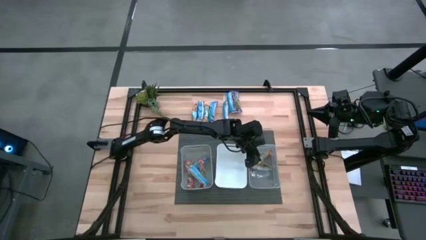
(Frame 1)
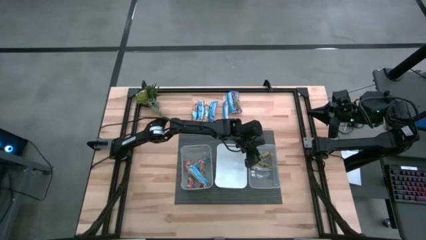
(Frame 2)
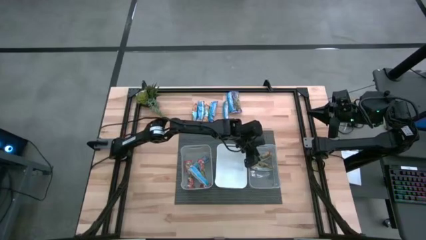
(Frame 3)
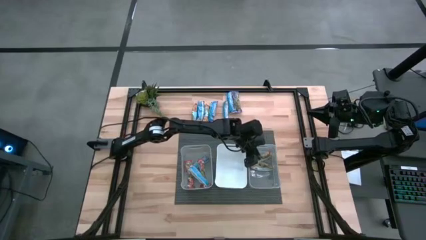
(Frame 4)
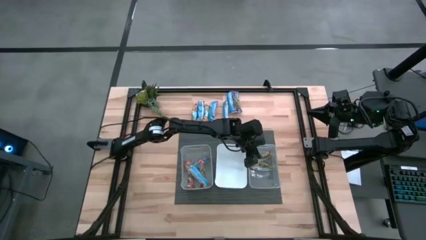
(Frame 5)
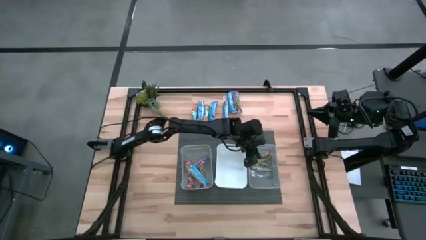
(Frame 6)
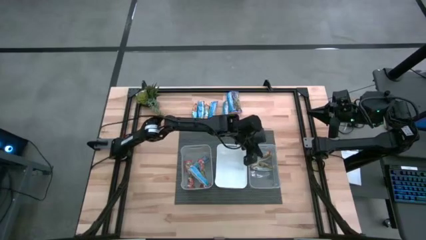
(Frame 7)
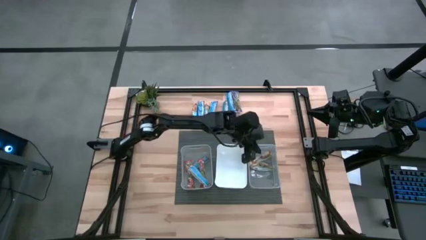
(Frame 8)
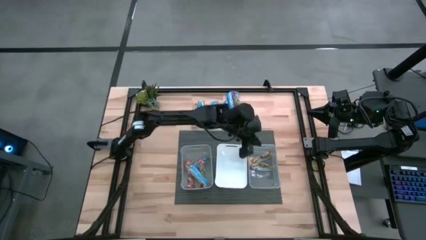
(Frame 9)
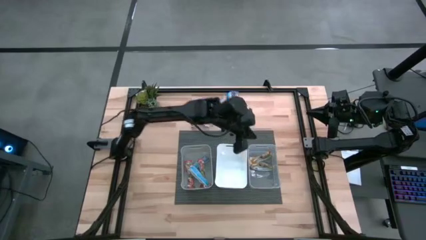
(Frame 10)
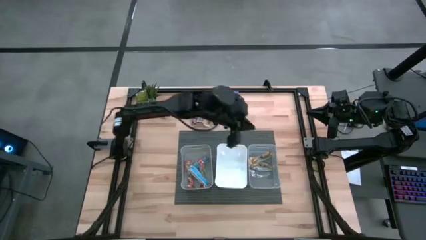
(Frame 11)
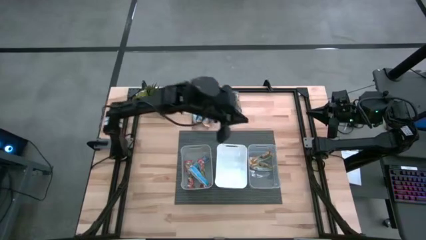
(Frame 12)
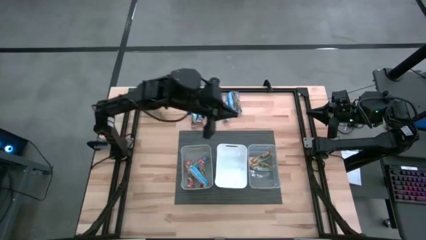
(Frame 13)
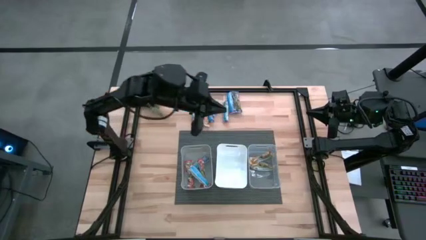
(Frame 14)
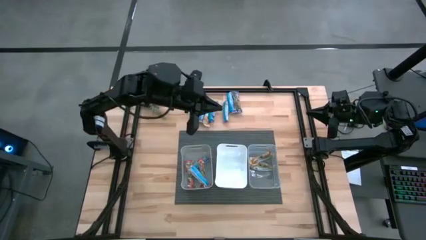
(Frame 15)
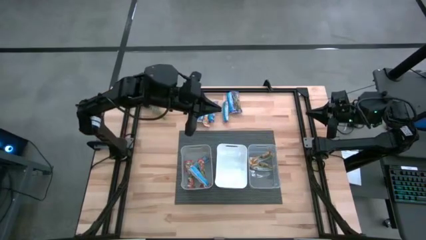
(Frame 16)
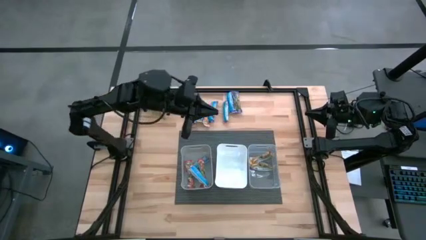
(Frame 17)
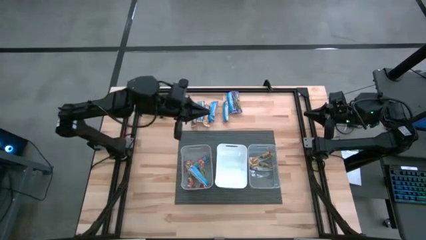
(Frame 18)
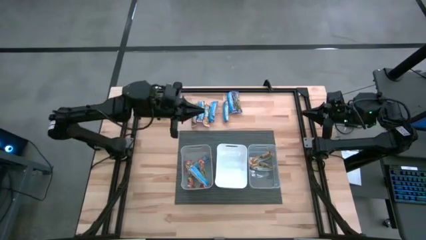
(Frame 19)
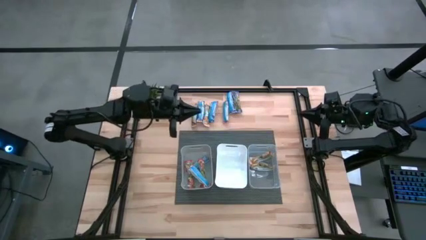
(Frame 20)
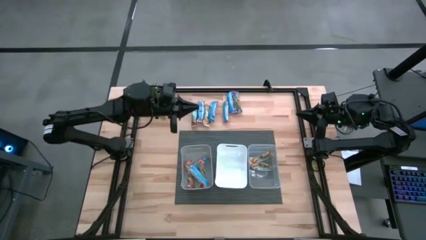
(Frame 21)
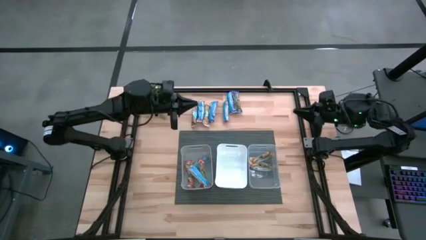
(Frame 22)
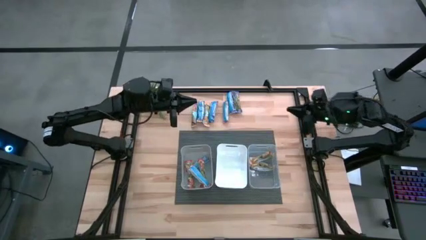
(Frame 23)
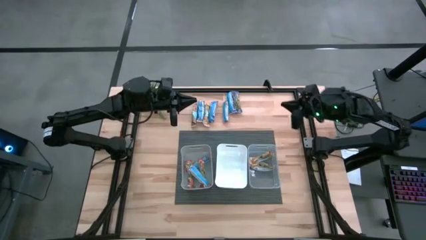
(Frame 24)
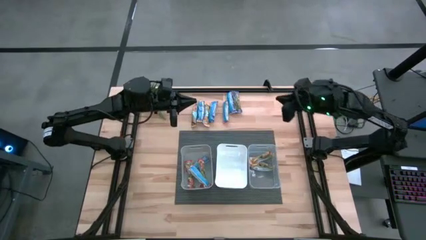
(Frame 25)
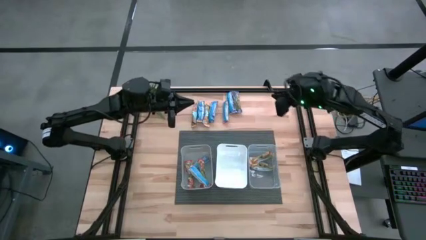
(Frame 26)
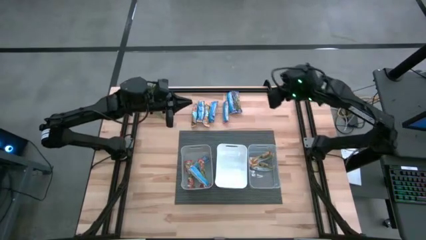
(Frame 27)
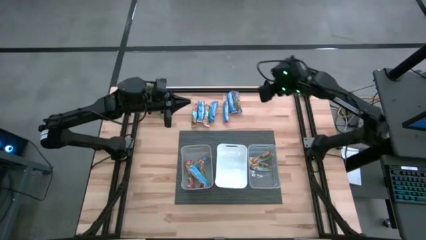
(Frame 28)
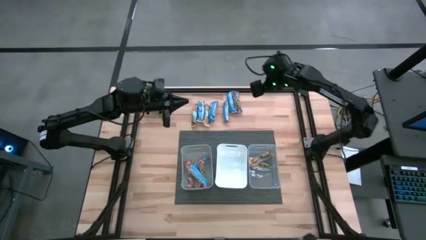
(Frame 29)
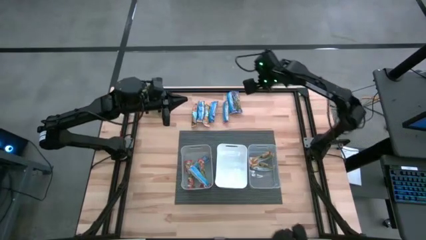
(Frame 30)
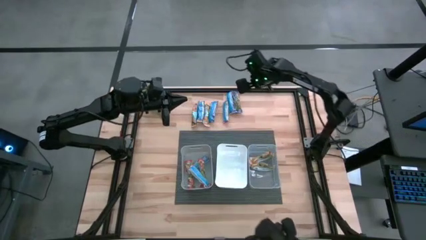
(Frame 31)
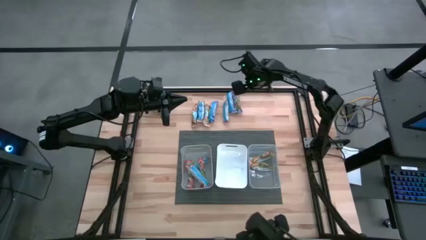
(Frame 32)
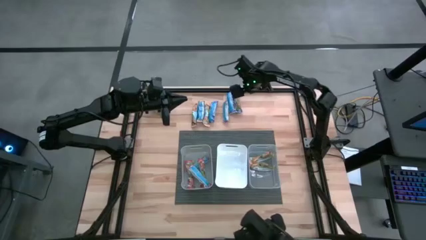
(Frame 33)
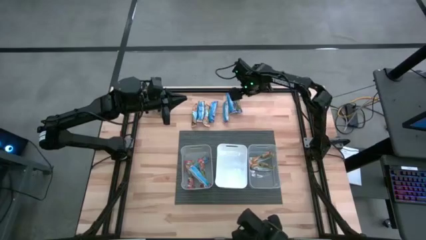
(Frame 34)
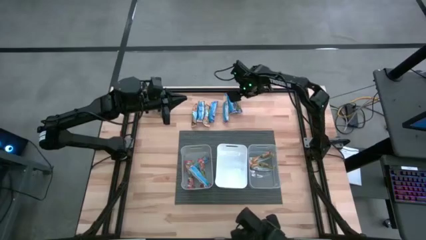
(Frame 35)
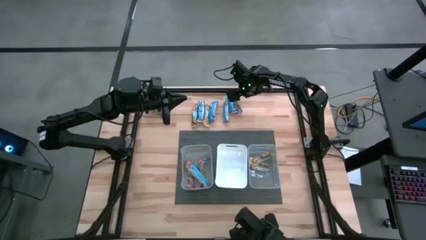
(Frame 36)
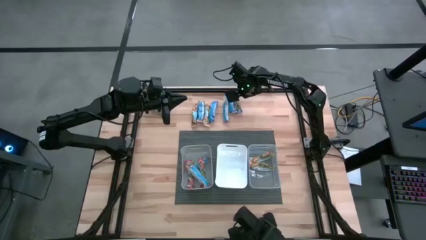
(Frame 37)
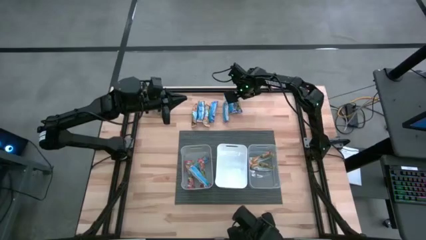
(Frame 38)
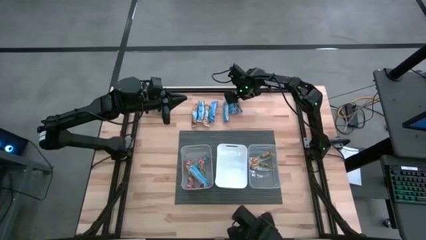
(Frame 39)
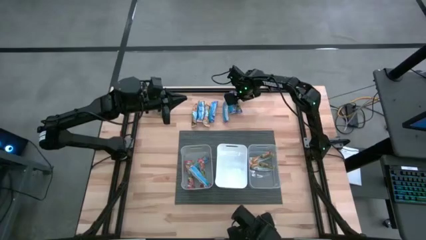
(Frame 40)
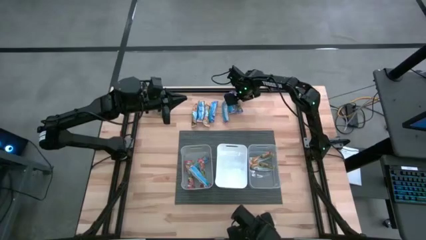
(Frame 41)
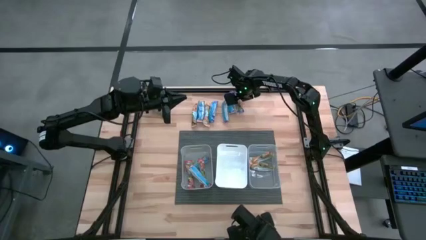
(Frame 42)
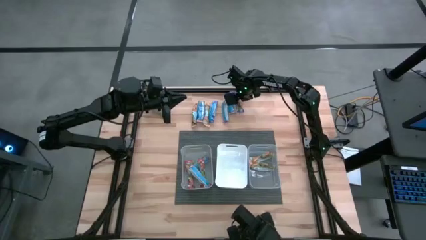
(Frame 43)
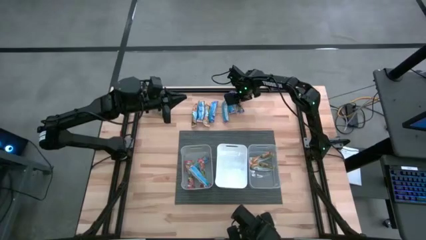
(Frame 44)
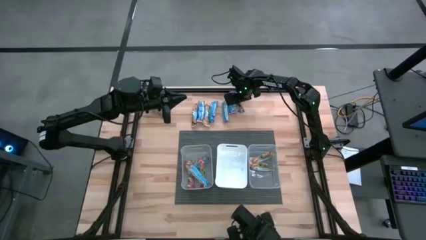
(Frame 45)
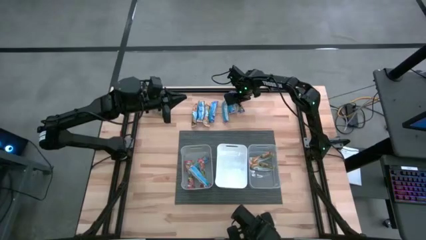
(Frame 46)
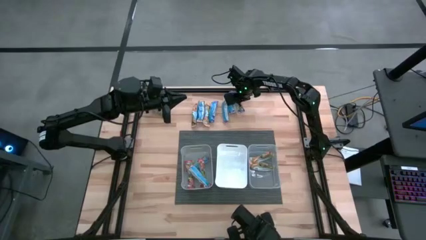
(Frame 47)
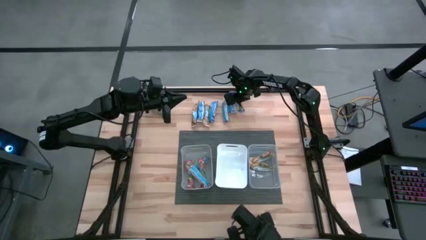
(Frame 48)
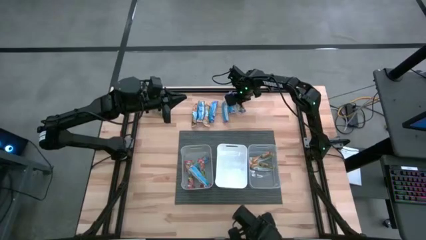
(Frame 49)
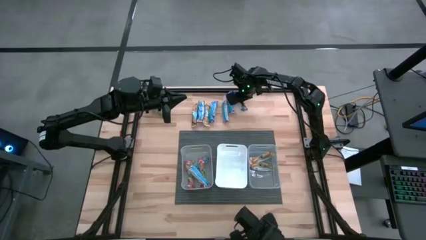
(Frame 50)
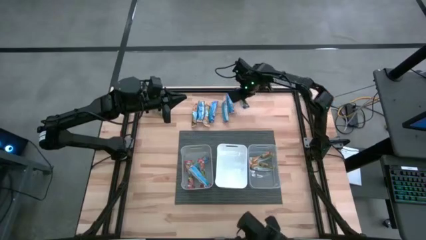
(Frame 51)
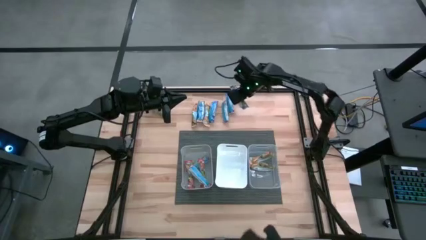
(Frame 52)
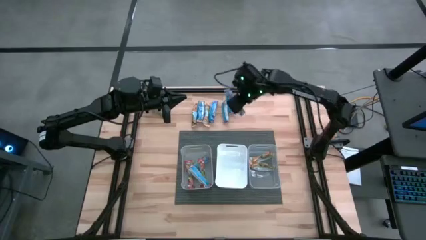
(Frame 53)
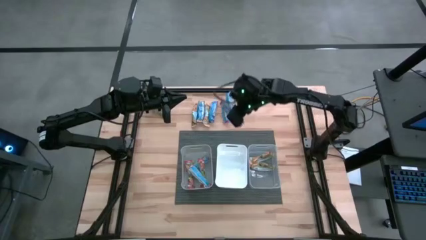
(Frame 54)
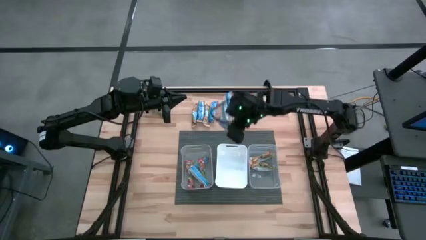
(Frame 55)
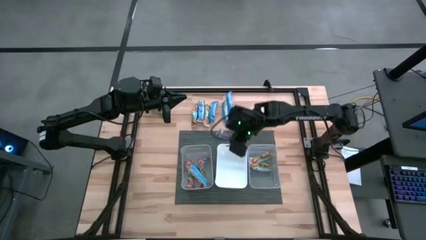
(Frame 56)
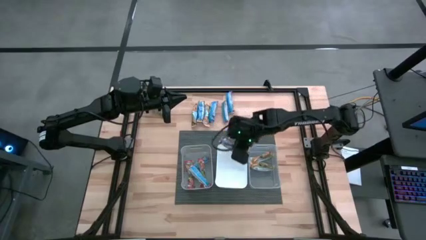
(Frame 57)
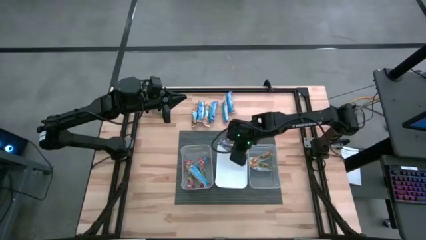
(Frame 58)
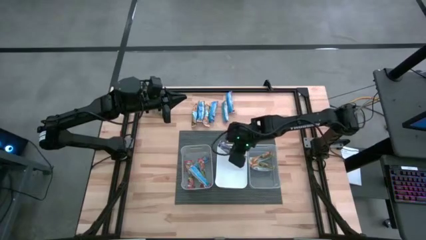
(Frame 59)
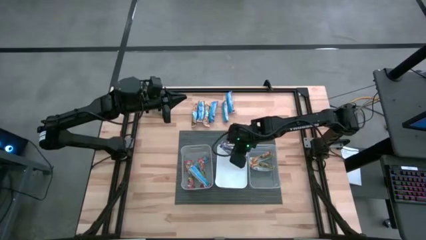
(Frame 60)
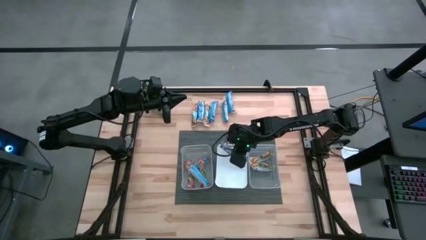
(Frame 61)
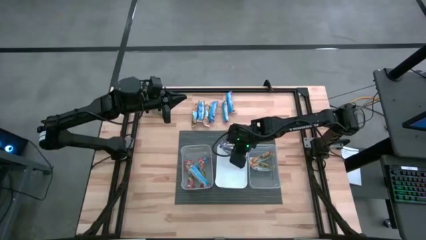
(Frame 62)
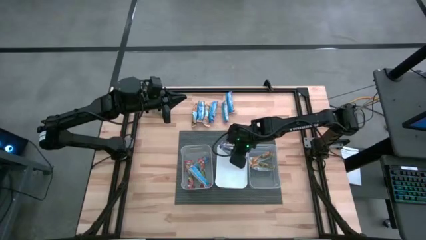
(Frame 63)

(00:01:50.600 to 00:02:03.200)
Task: Pick and place Granola Bars by type
Put the blue granola bar into the white bin

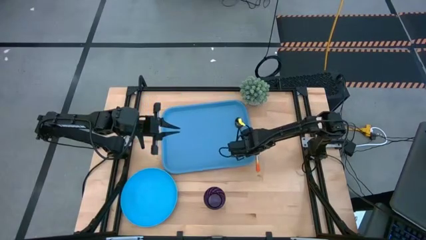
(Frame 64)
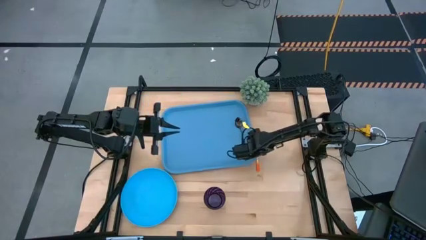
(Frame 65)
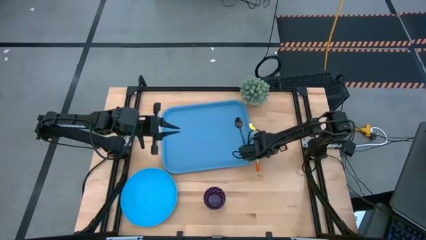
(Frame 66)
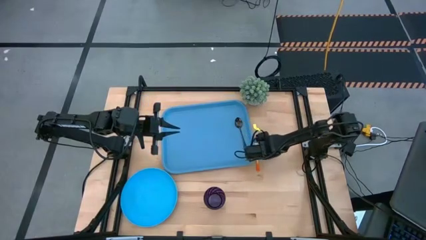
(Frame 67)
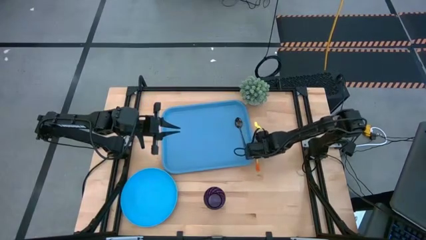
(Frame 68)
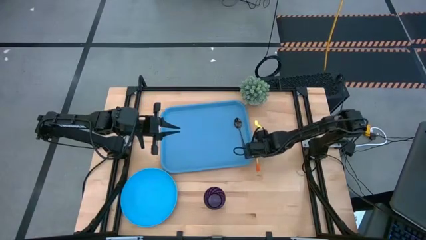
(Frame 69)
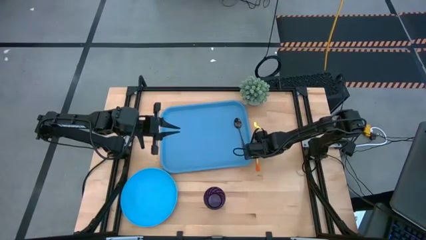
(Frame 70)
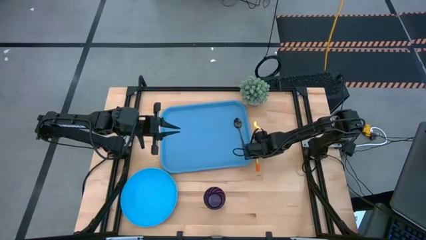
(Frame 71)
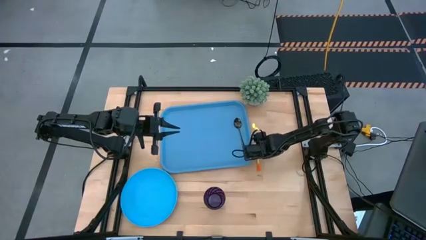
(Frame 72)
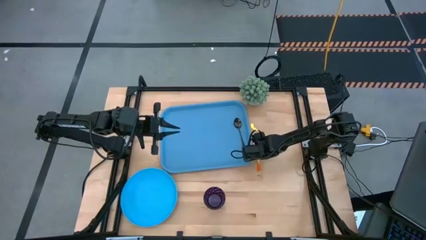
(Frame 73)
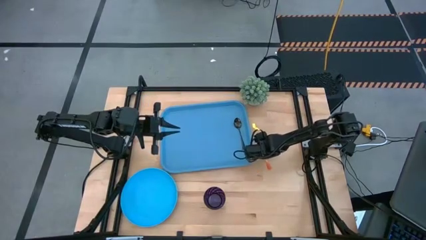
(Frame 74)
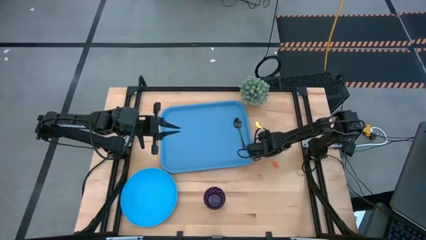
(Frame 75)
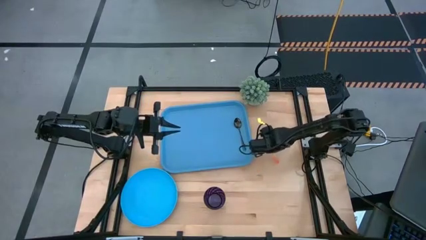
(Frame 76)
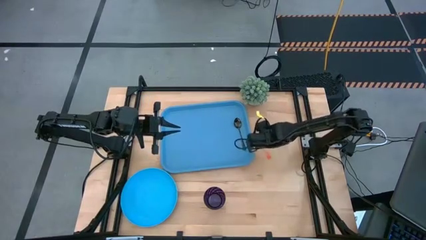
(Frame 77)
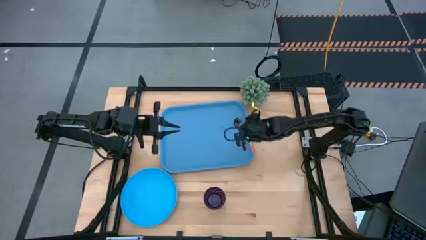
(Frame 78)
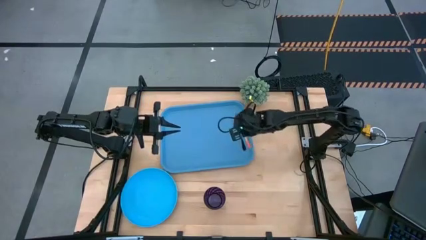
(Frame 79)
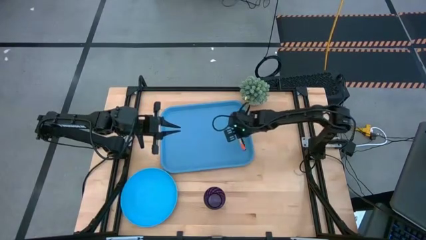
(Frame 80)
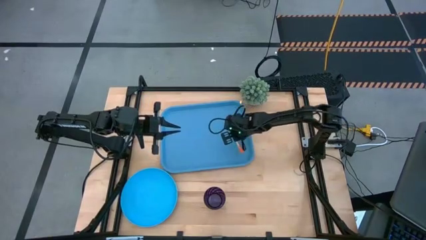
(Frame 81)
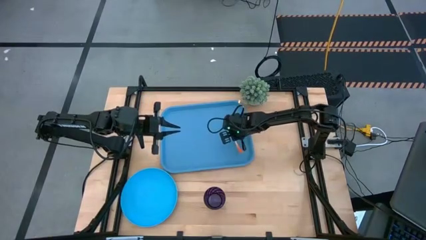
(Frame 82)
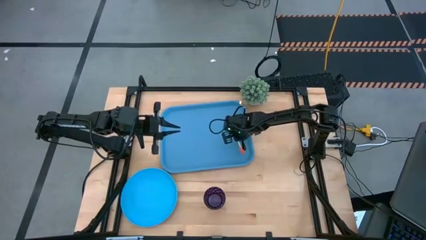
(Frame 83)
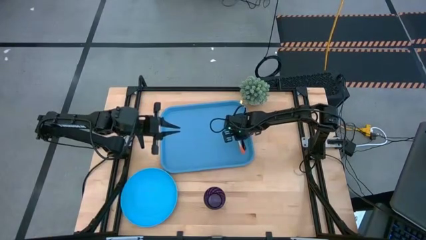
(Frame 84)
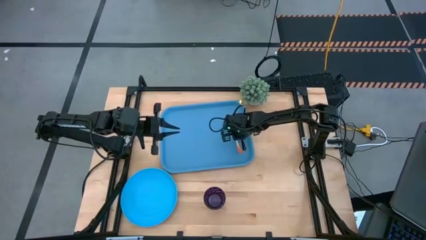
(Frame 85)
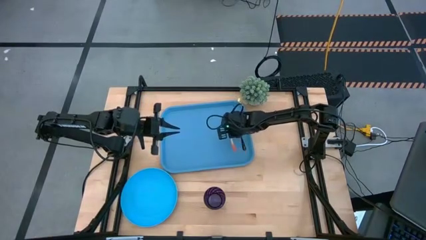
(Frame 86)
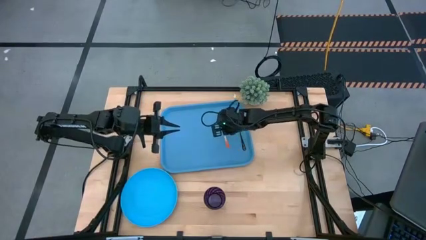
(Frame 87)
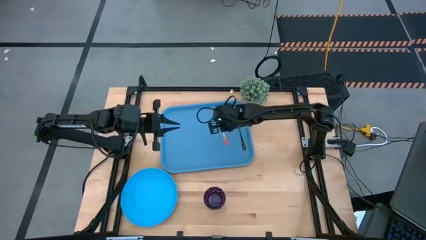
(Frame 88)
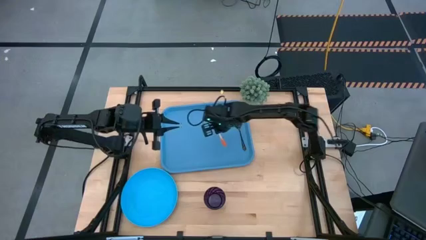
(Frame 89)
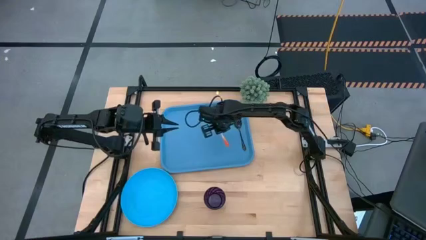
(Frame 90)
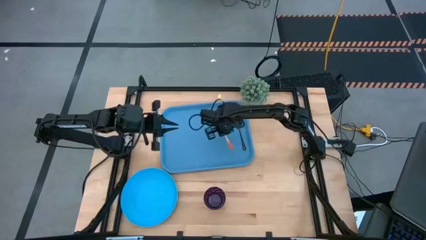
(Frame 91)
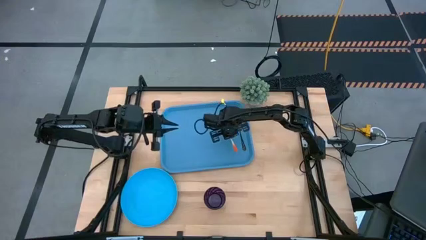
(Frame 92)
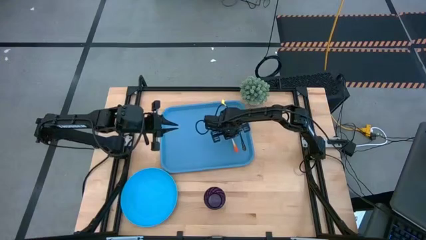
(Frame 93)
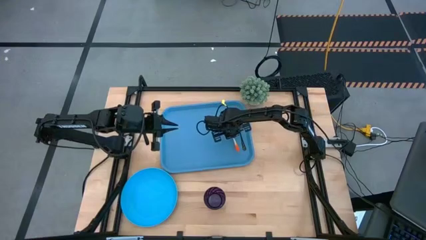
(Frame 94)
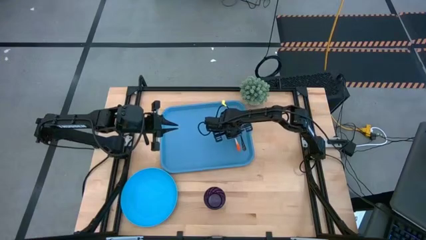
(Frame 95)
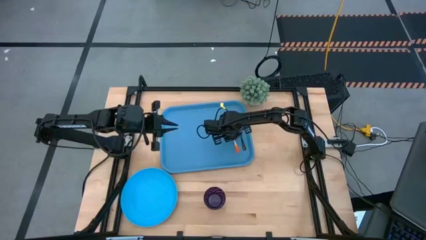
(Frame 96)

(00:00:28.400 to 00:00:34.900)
Task: Pick and place plate/cup/fork/spoon on tray
Put the orange fork onto the left side of the black spoon on the tray
